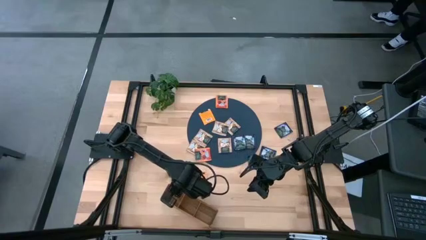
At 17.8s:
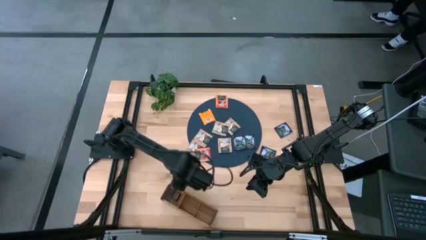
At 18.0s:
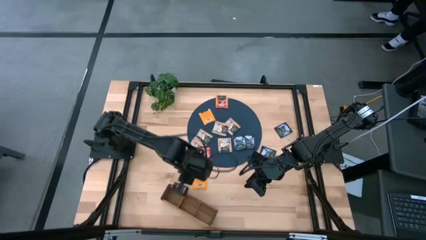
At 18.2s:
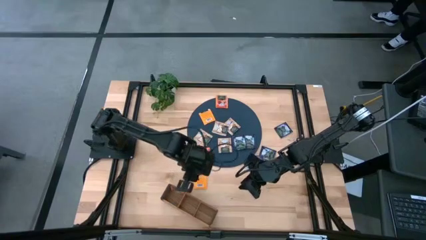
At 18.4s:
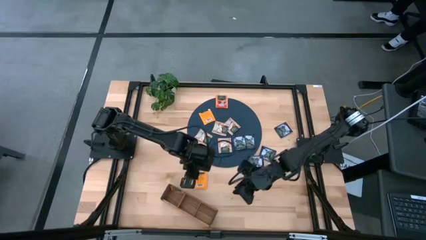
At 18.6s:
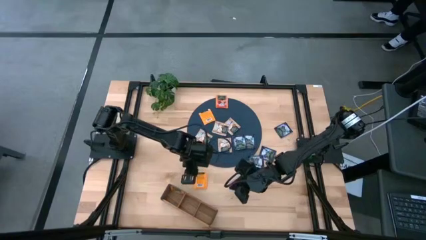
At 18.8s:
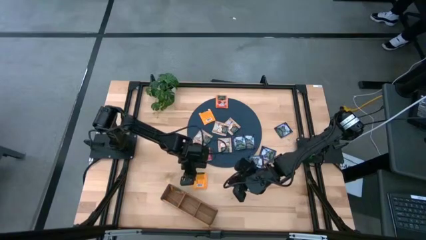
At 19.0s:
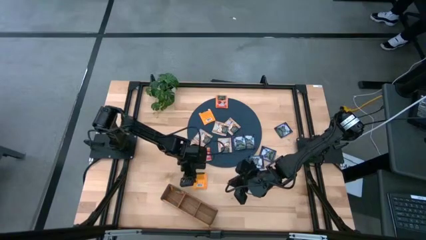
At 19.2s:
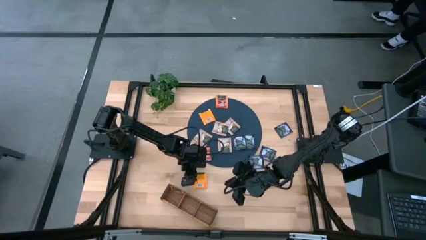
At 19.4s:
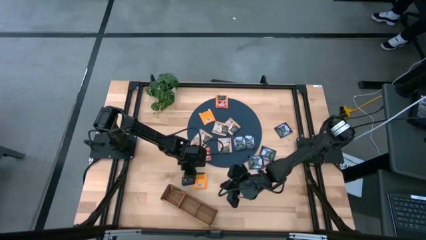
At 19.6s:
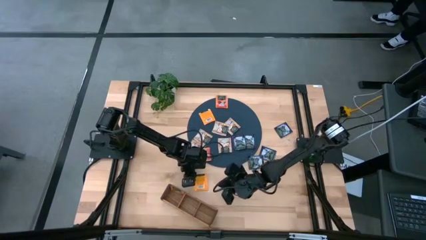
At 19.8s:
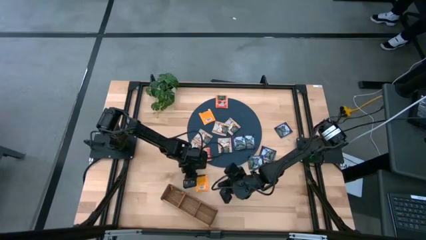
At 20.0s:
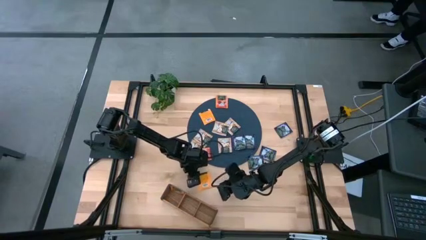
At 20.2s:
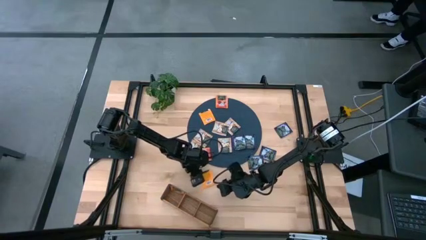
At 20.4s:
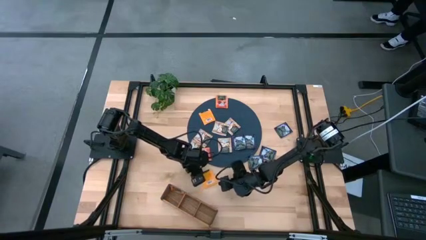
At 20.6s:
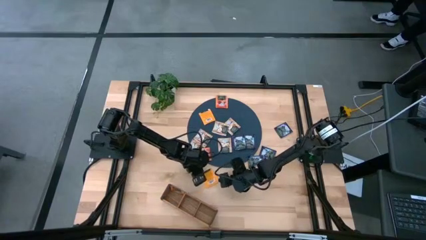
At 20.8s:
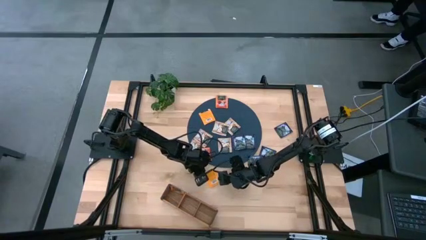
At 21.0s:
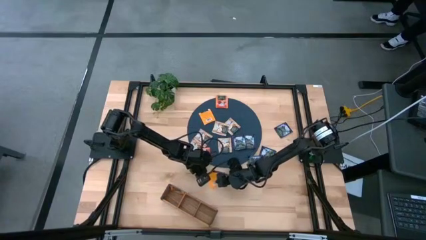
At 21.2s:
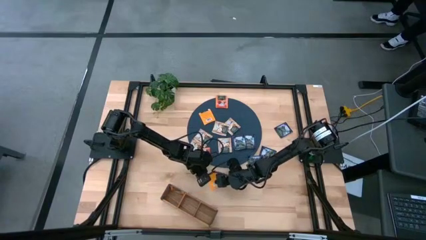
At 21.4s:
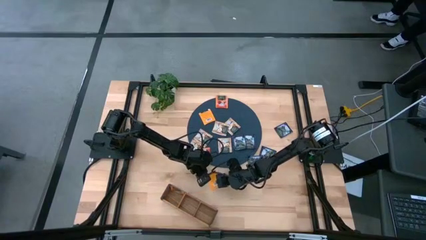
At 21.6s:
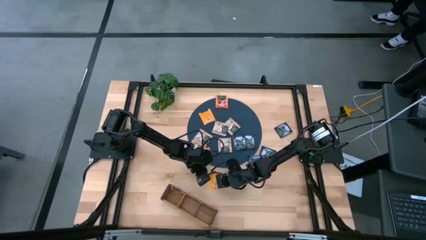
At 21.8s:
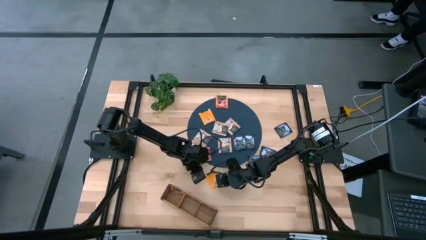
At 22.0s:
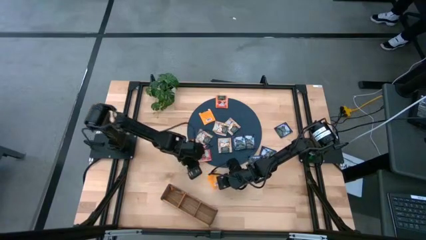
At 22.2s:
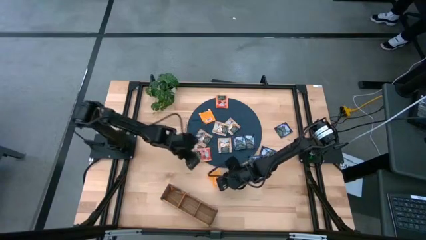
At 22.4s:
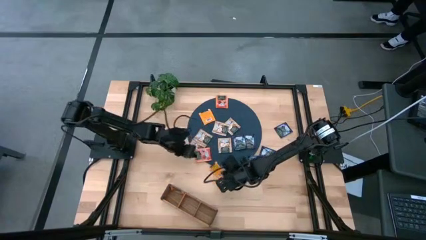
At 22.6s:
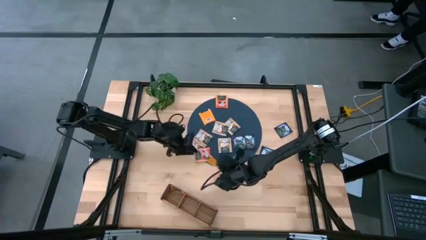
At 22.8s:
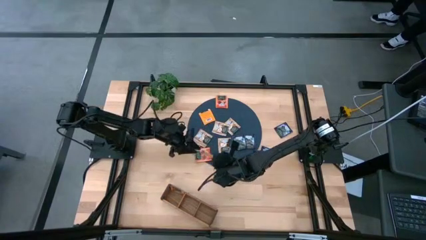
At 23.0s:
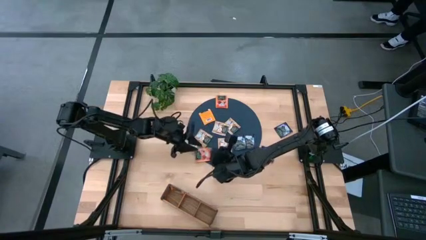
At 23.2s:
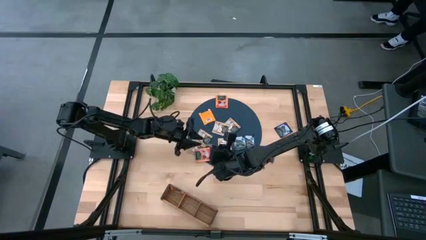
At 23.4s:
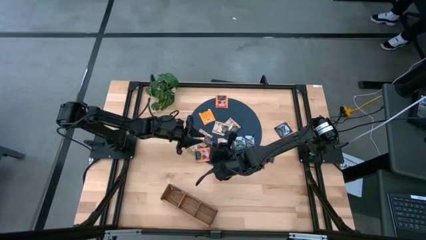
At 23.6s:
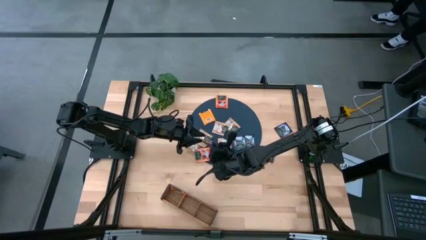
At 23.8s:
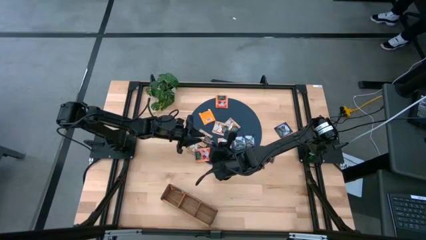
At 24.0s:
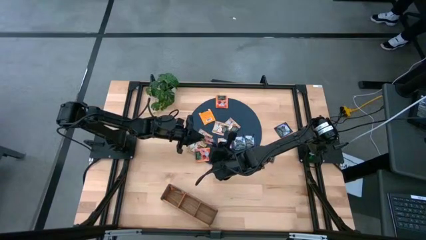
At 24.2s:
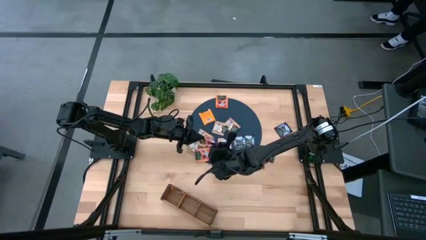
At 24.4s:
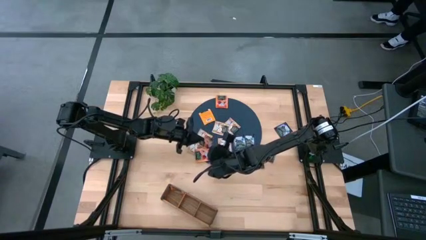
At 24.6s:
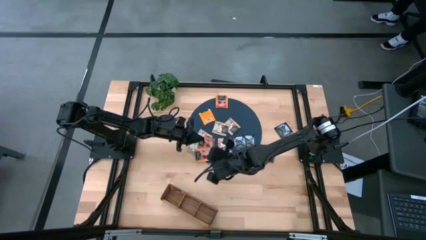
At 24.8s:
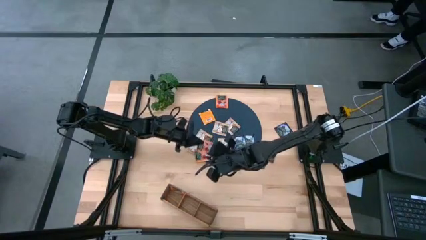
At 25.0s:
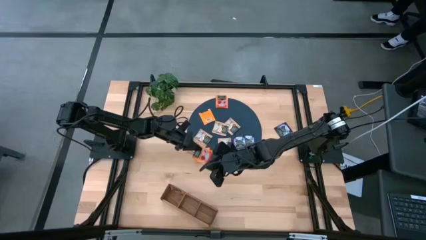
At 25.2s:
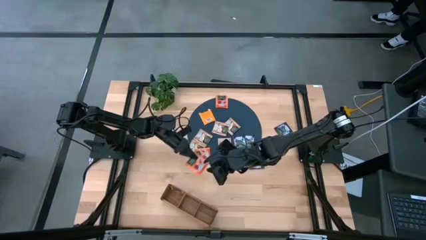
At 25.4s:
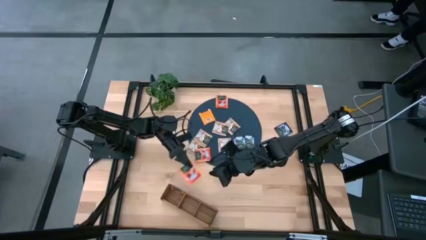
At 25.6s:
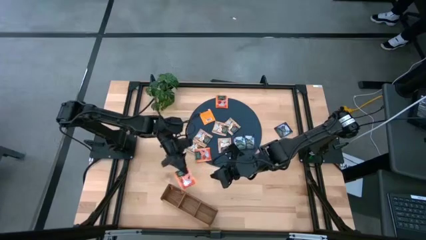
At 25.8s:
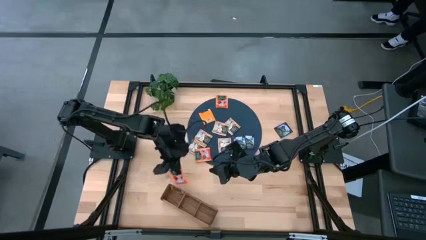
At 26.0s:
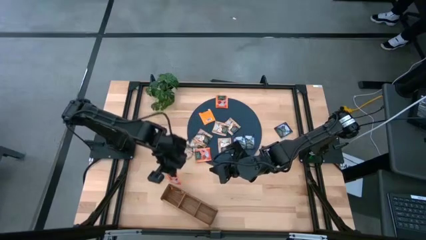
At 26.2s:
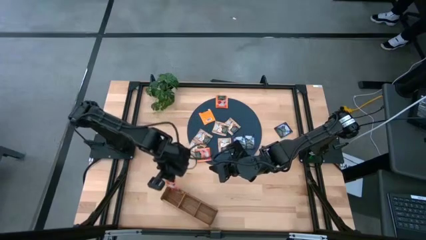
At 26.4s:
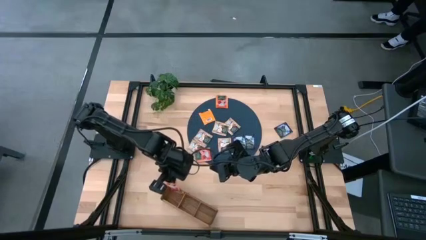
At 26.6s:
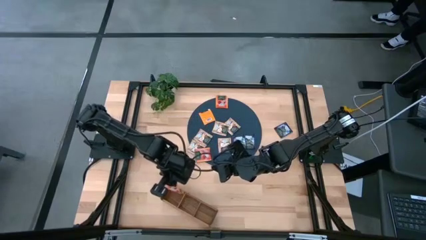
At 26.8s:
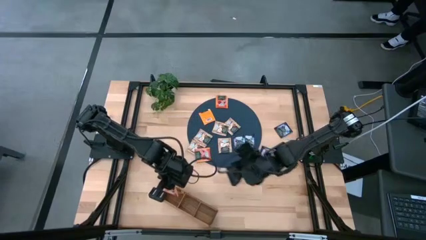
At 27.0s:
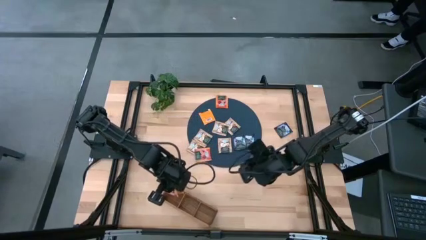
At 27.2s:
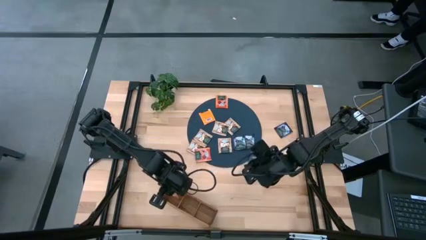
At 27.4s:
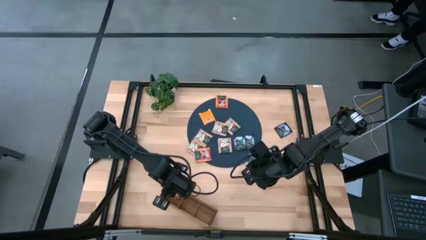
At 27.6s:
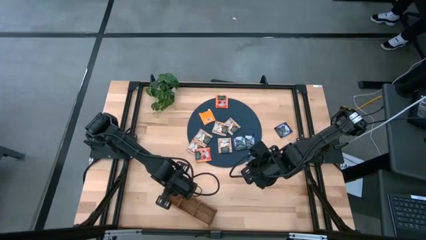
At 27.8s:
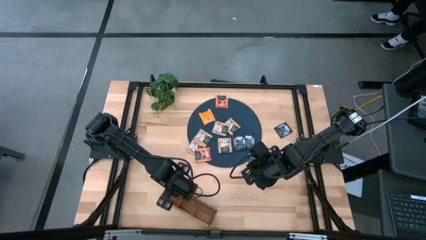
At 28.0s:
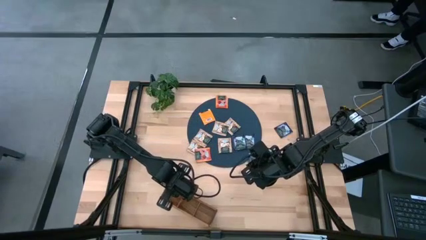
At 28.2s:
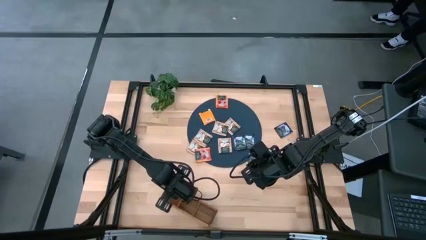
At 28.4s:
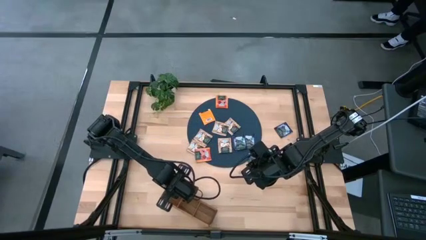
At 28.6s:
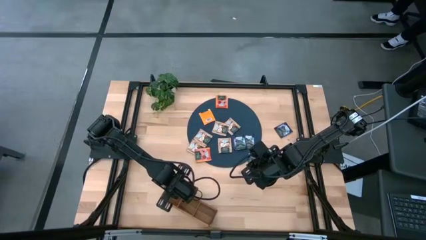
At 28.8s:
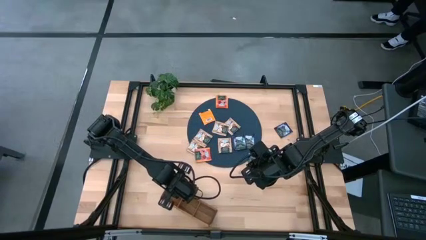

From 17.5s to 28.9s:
Task: Pick & Place Tea
Put the orange tea bag into the left section of the wooden organizer
